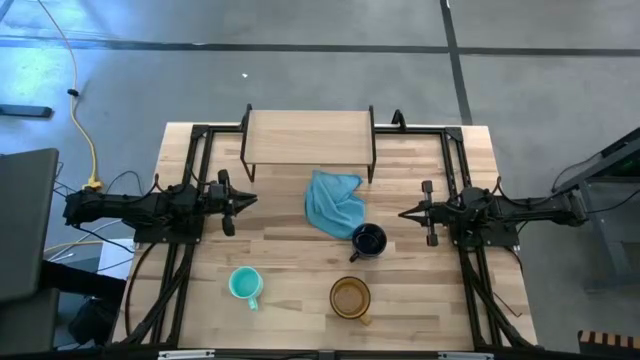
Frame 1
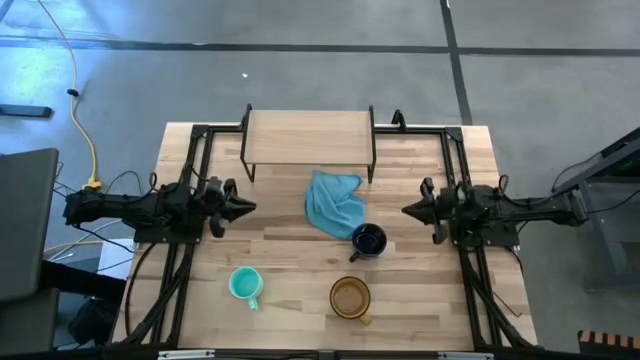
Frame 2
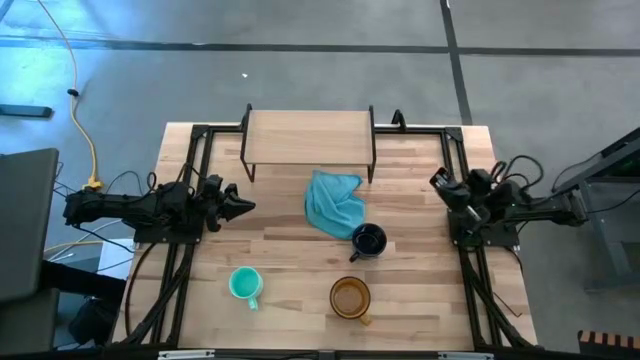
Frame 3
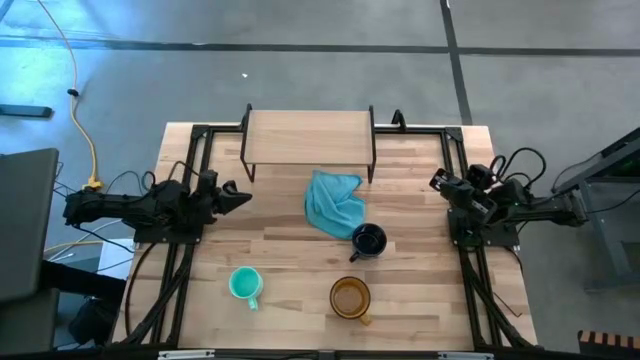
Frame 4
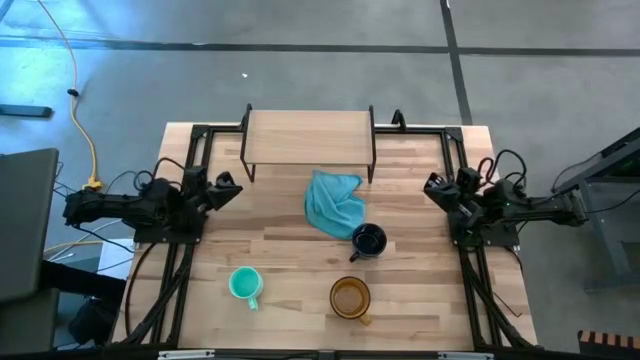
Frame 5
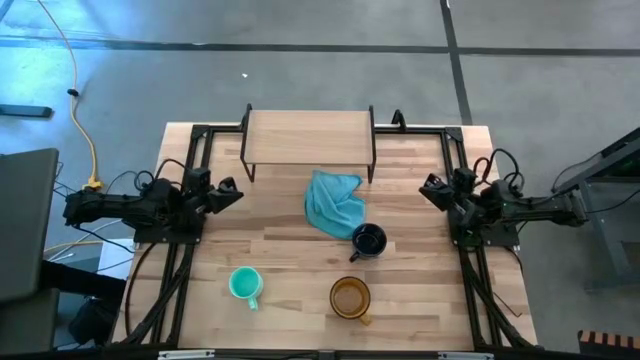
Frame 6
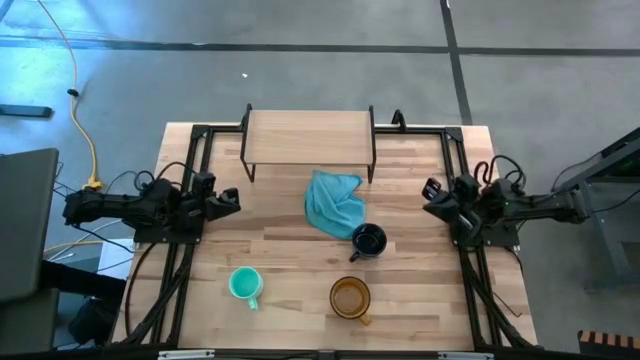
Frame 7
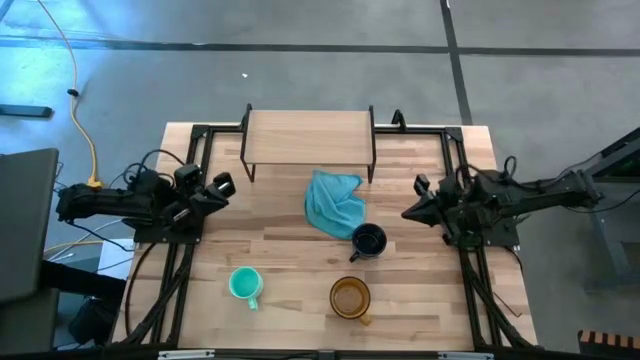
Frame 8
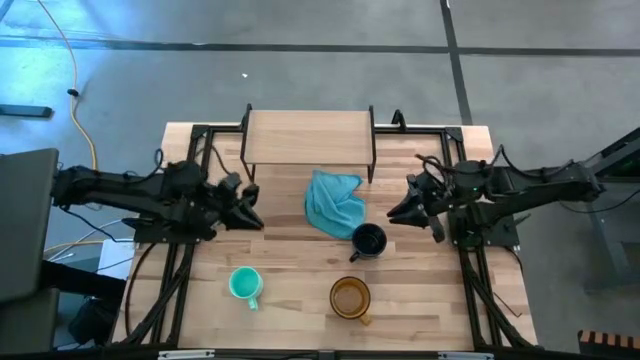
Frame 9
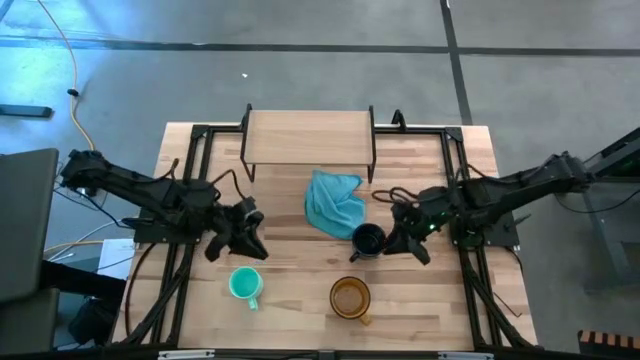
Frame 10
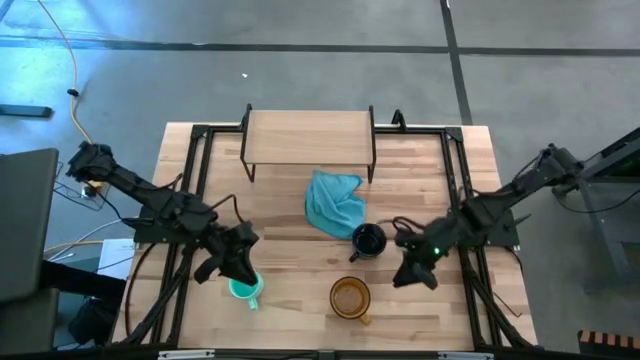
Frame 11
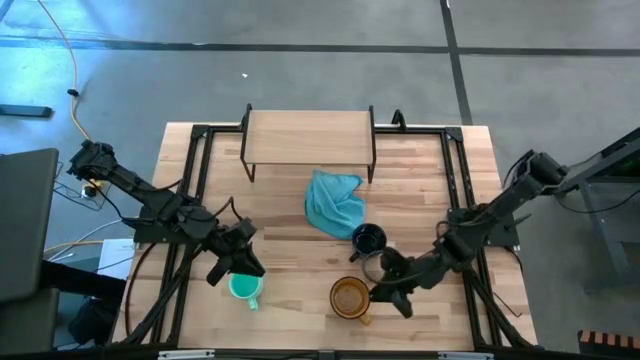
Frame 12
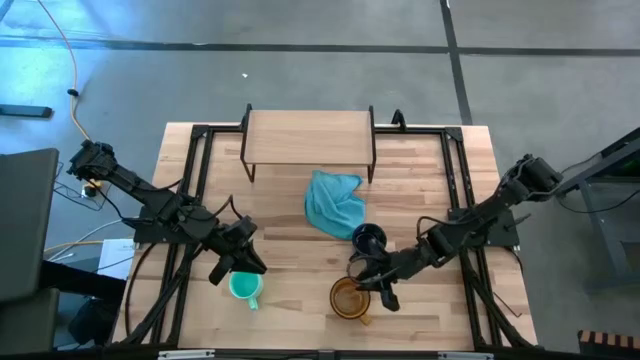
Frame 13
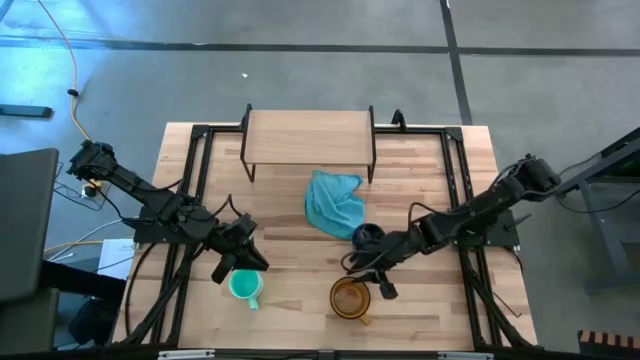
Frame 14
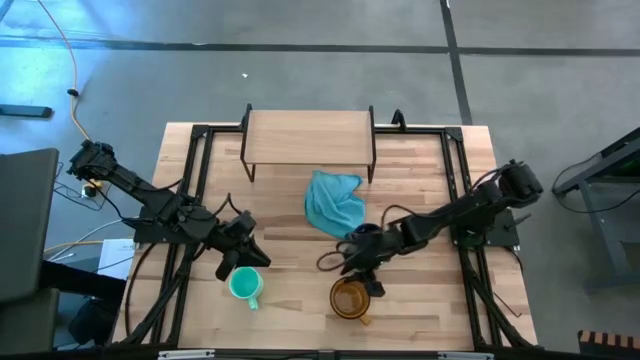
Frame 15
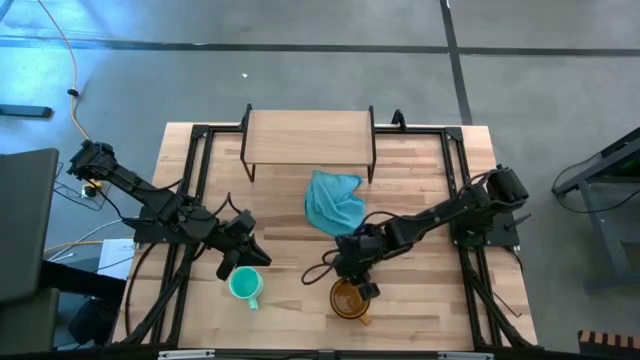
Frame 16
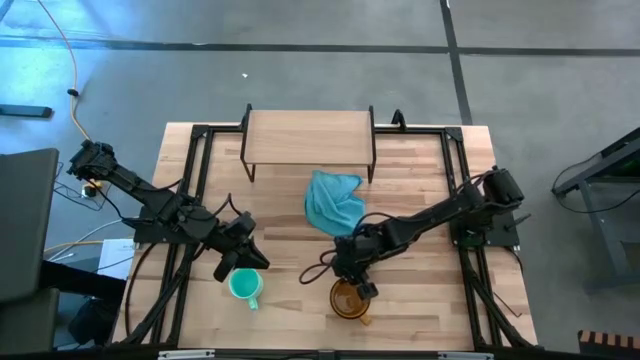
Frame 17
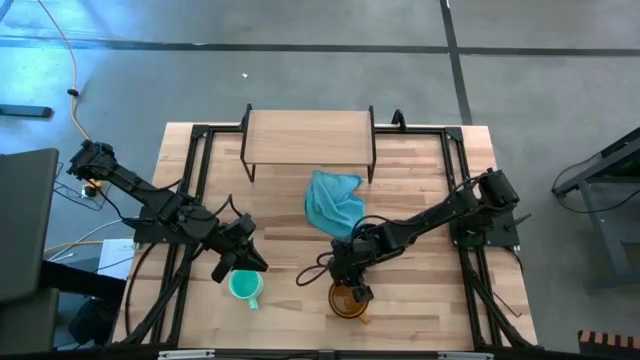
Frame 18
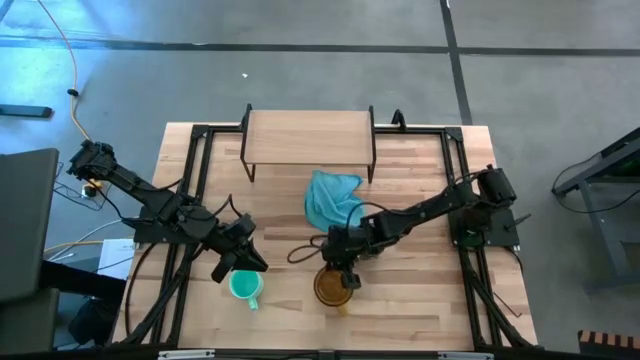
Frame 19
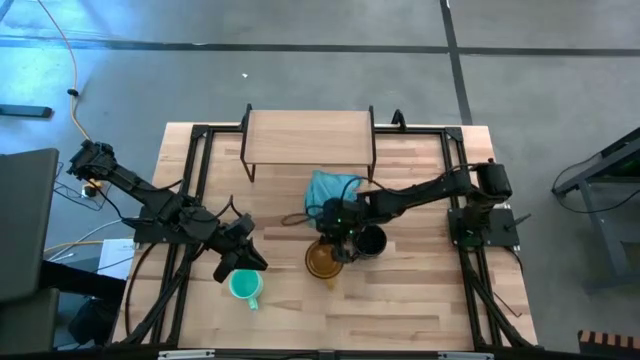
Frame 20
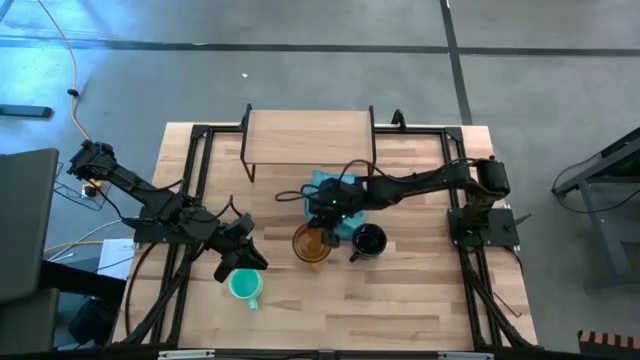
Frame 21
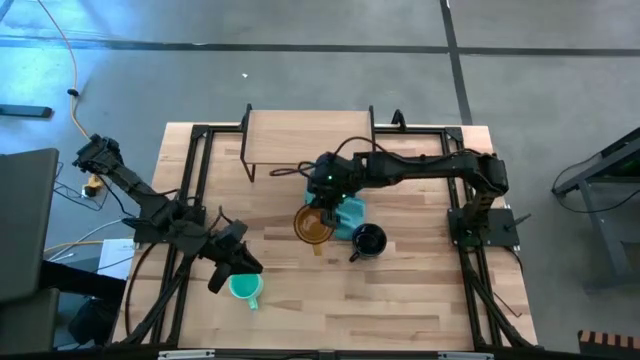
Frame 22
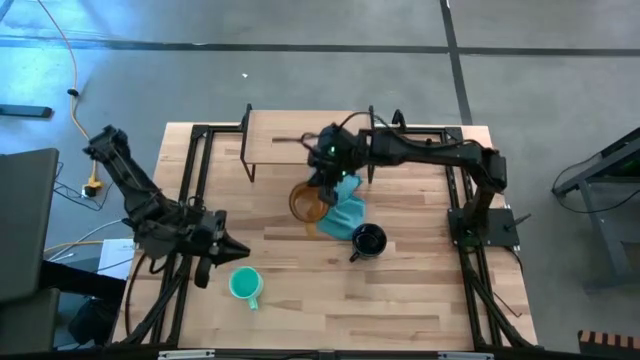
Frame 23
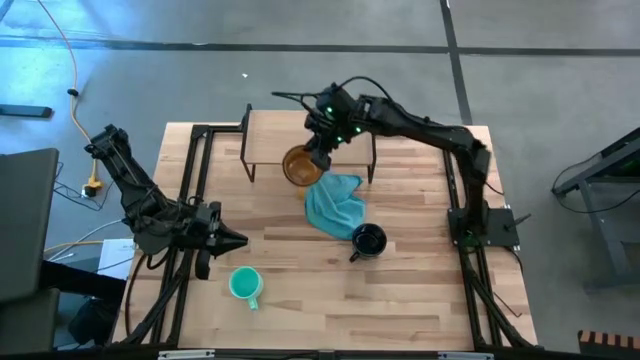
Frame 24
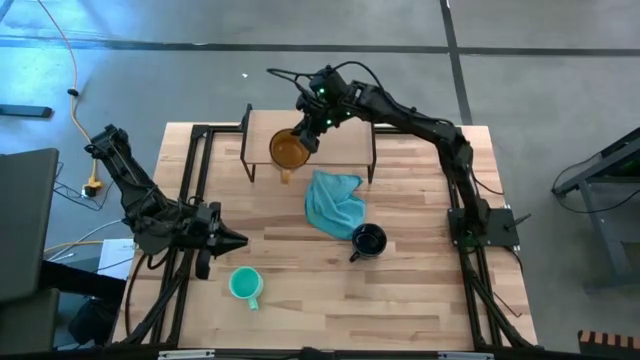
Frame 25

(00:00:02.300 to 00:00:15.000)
Task: Stack small to large cups/mugs on shelf
Put the yellow mug on the shelf

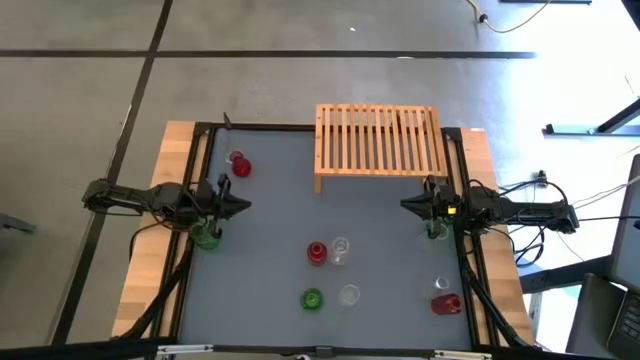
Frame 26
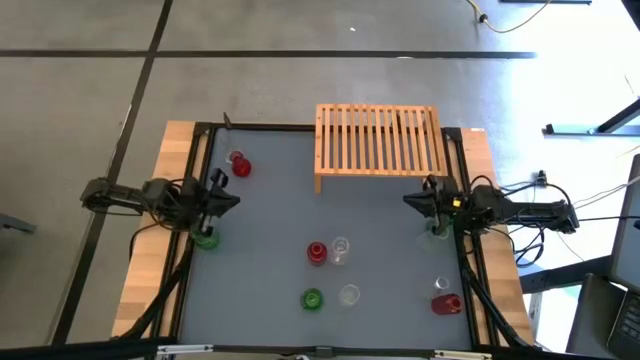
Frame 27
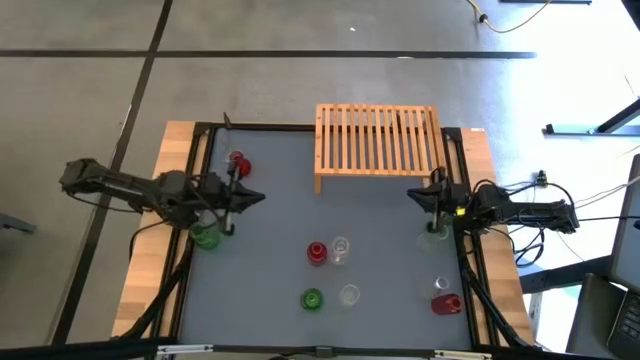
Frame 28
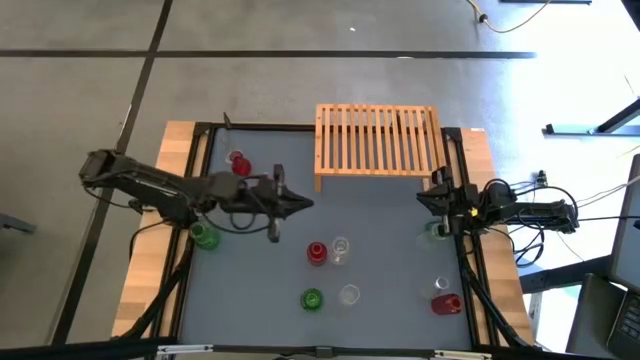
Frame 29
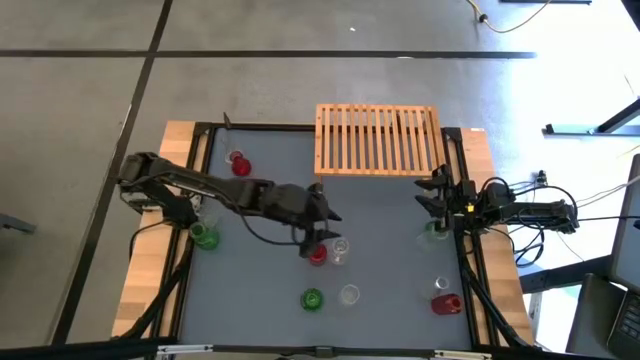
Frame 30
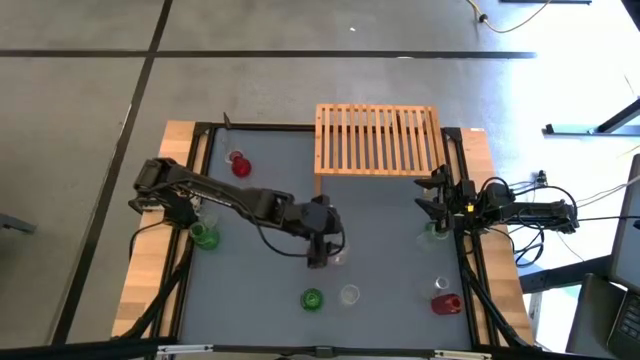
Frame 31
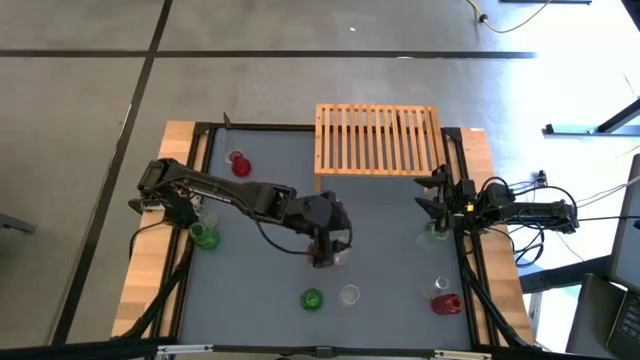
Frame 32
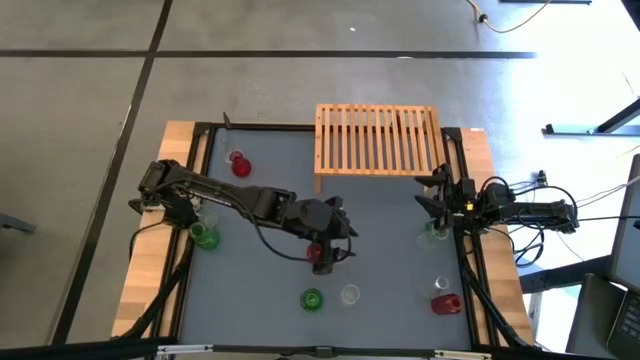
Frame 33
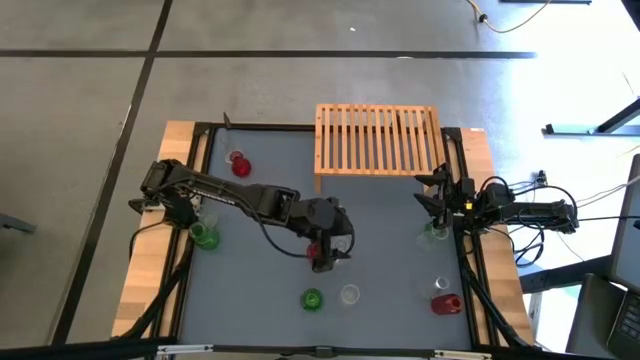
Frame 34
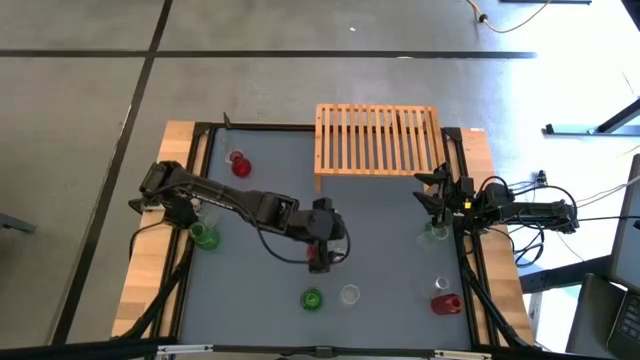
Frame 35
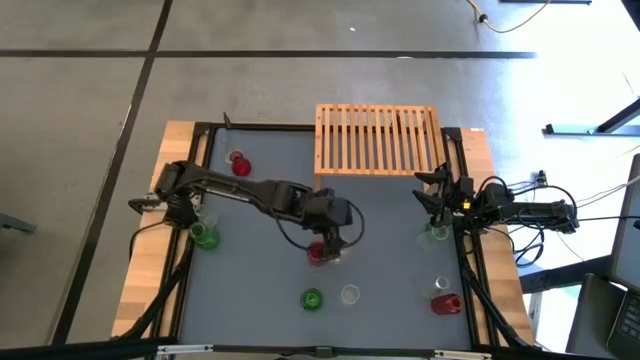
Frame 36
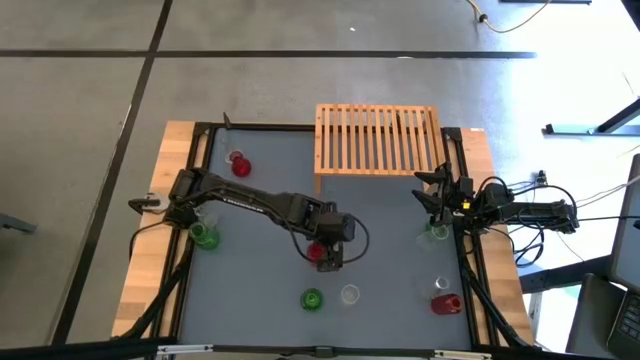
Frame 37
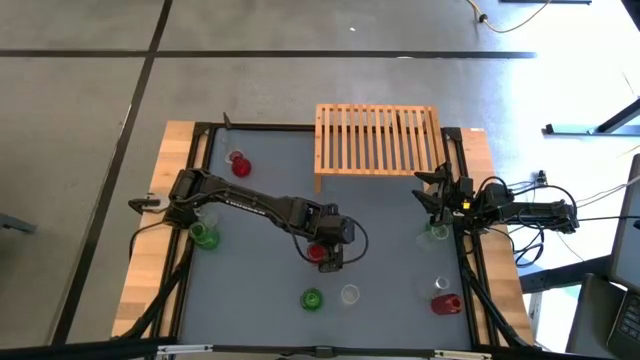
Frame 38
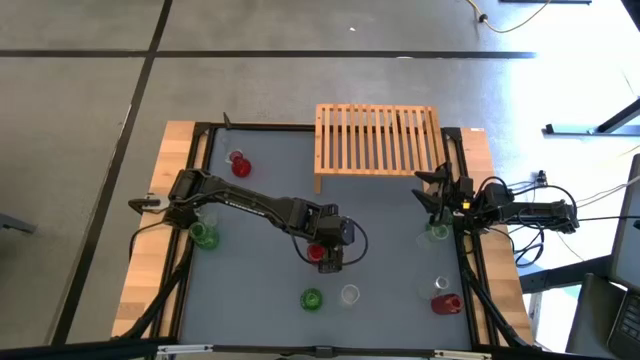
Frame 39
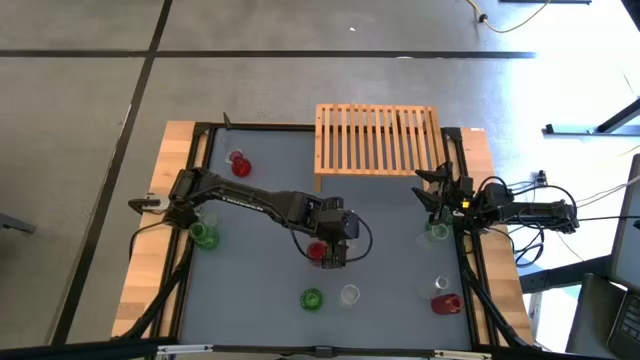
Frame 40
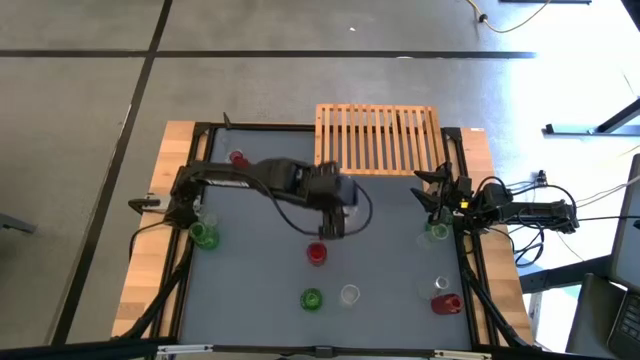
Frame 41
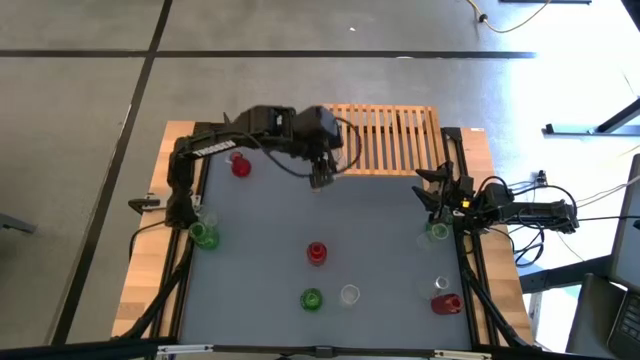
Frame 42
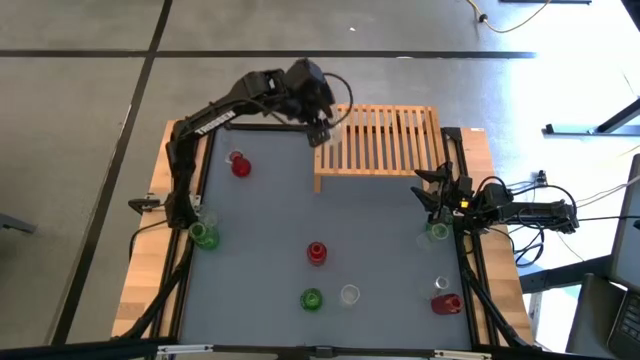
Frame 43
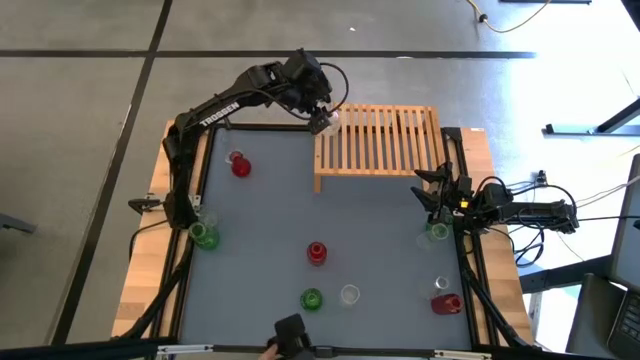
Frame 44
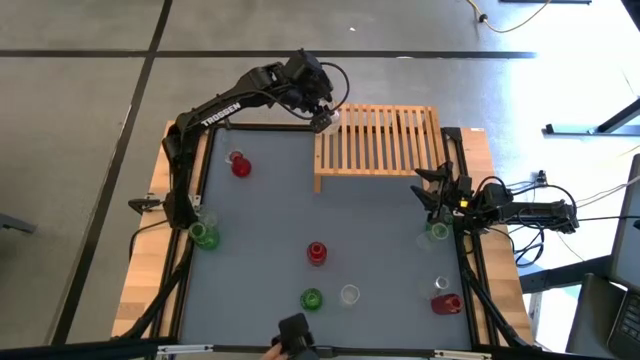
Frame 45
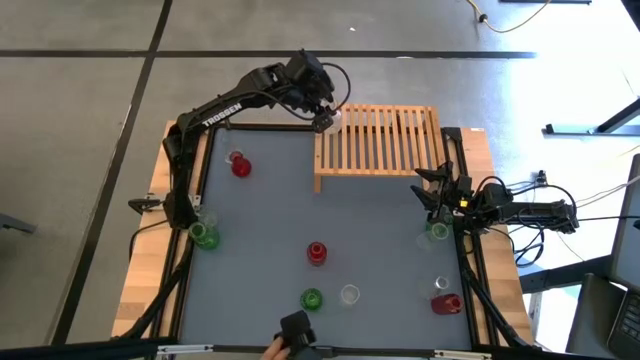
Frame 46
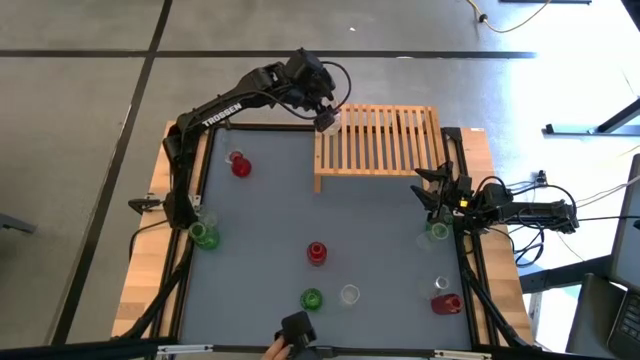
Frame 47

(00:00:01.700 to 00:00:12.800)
Task: sort vases onto shelf
Put the center white transparent vase onto the shelf aligned with the other white transparent vase
